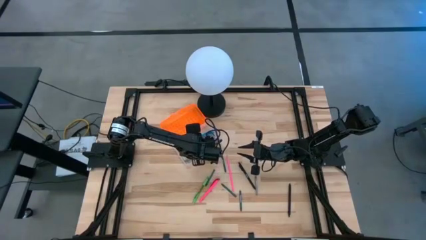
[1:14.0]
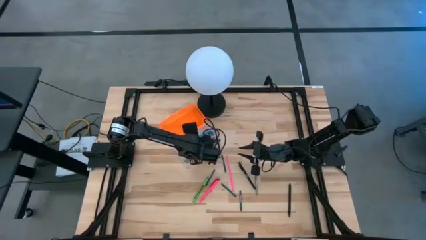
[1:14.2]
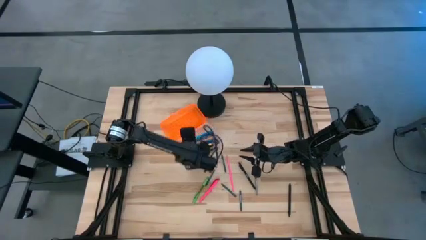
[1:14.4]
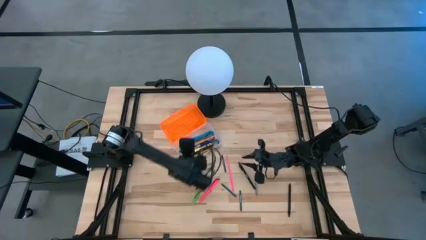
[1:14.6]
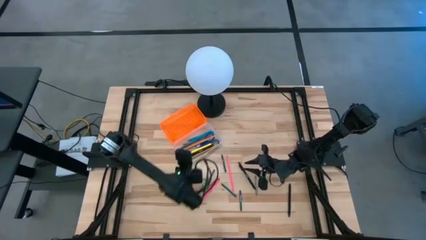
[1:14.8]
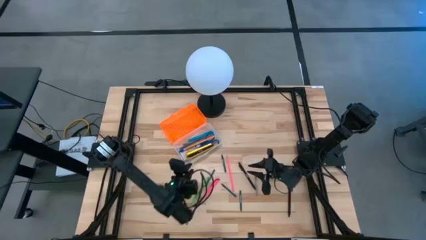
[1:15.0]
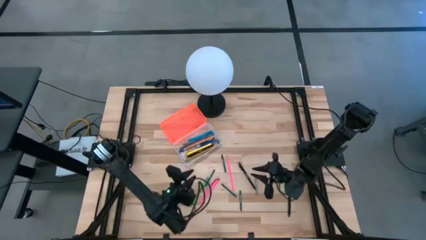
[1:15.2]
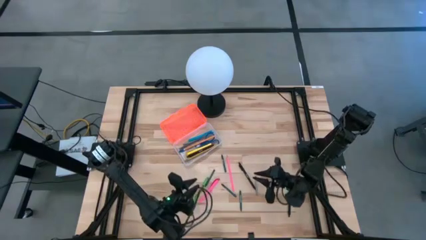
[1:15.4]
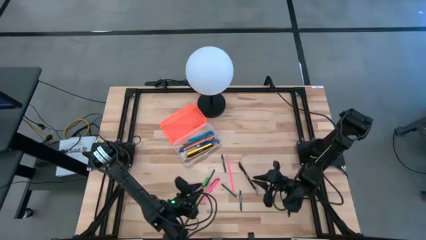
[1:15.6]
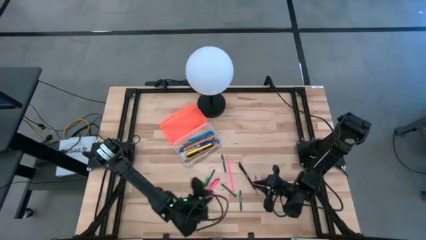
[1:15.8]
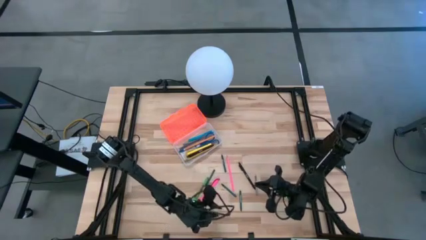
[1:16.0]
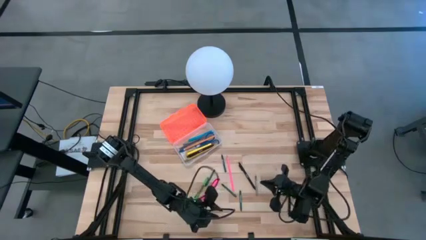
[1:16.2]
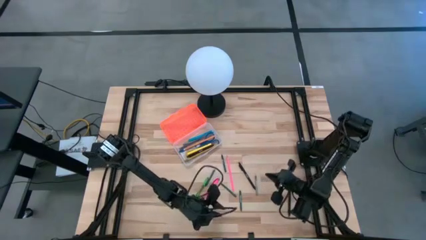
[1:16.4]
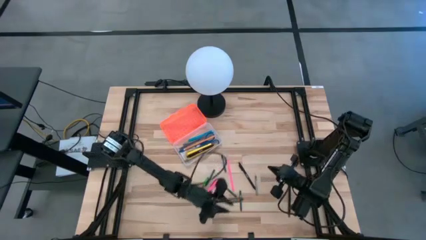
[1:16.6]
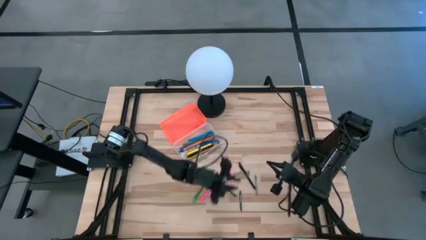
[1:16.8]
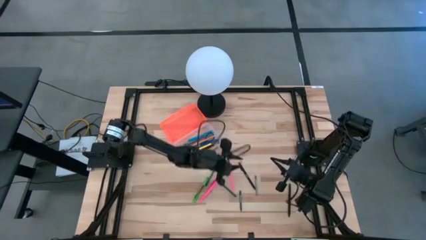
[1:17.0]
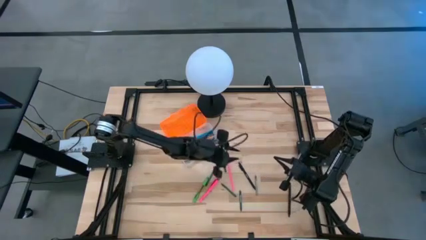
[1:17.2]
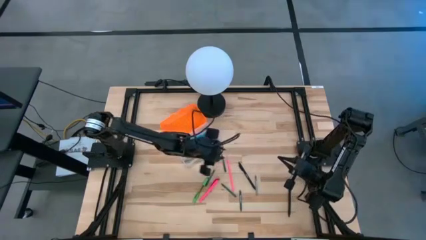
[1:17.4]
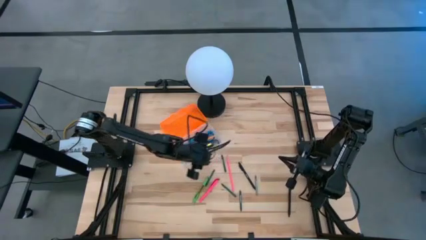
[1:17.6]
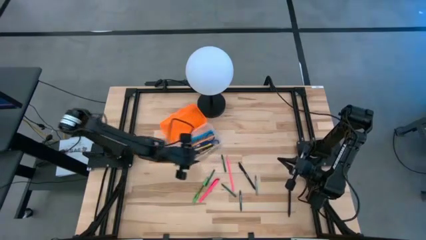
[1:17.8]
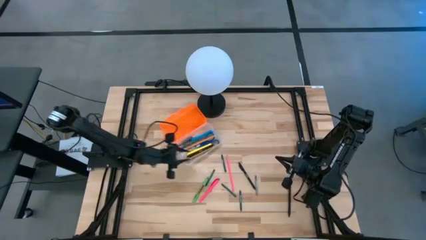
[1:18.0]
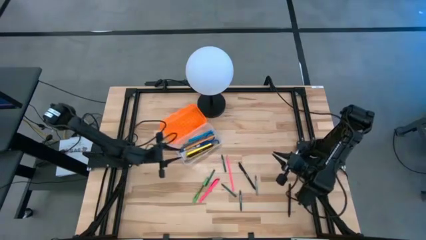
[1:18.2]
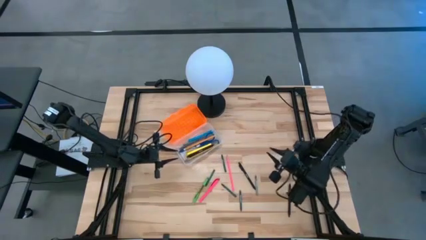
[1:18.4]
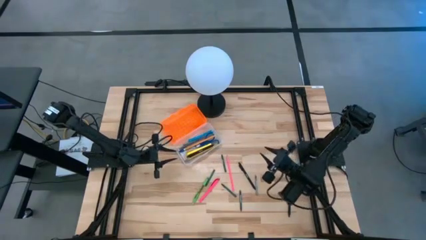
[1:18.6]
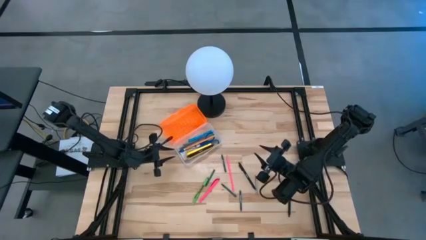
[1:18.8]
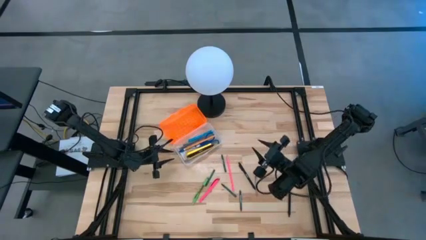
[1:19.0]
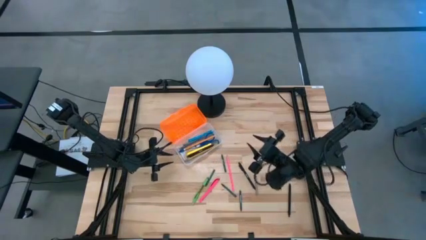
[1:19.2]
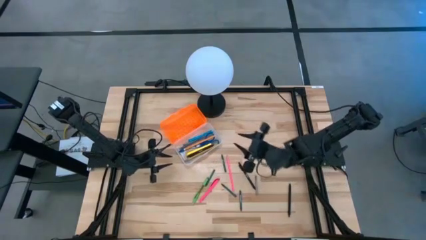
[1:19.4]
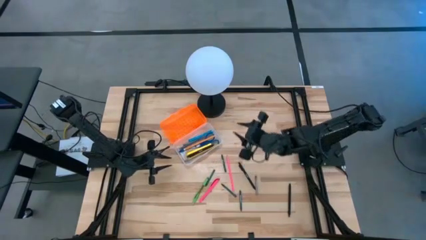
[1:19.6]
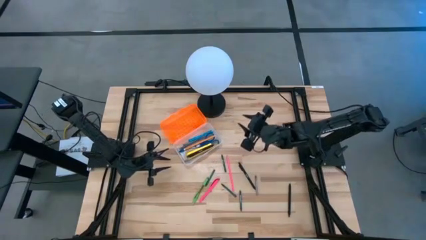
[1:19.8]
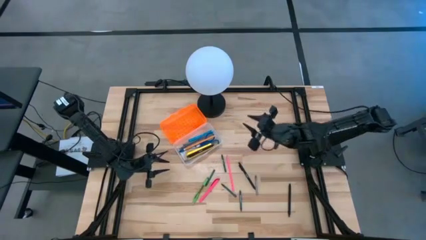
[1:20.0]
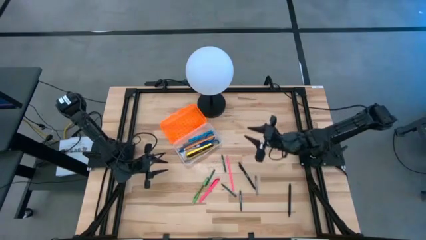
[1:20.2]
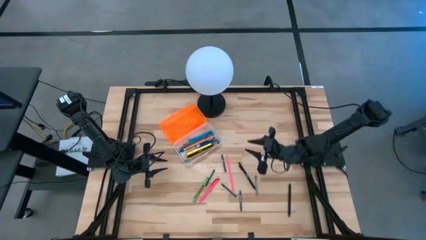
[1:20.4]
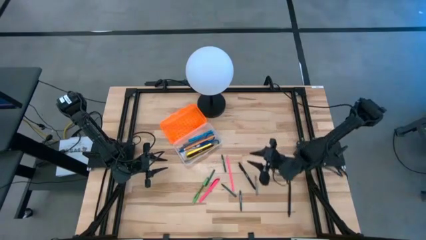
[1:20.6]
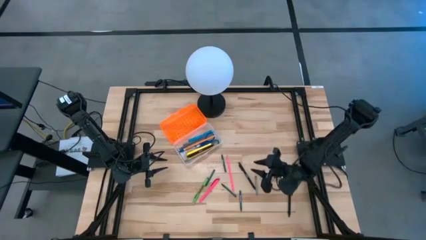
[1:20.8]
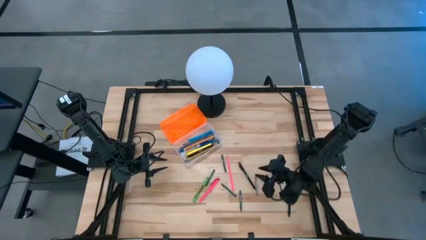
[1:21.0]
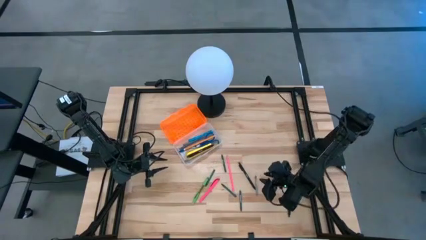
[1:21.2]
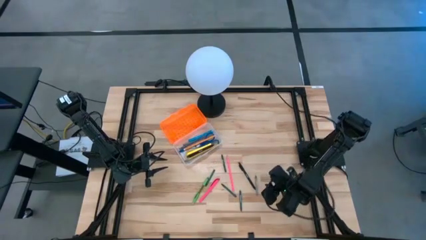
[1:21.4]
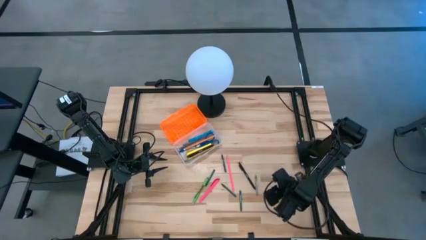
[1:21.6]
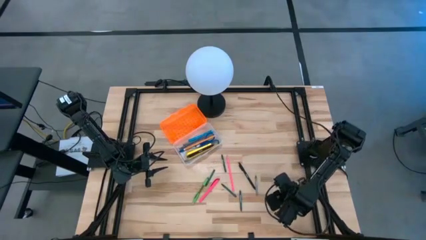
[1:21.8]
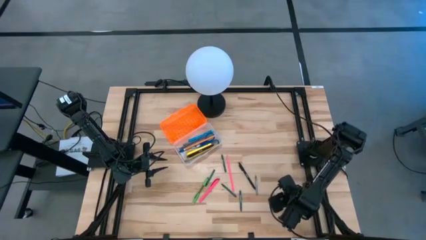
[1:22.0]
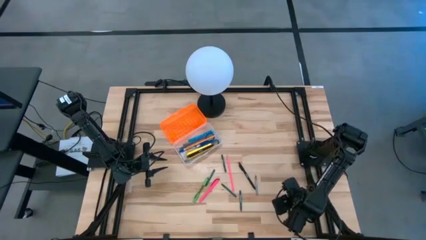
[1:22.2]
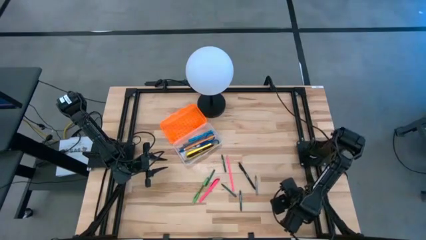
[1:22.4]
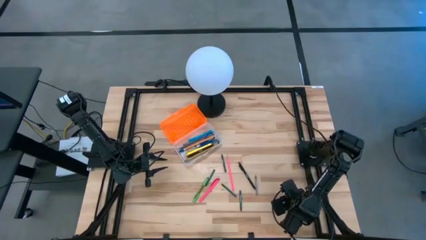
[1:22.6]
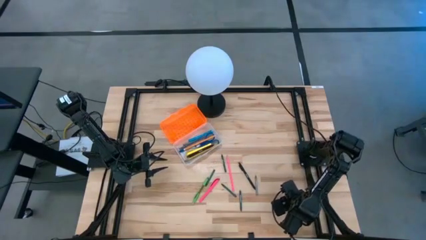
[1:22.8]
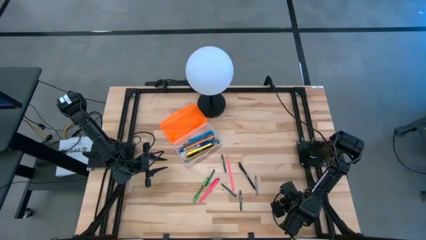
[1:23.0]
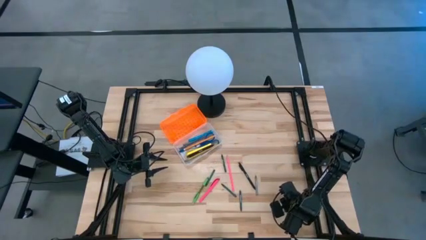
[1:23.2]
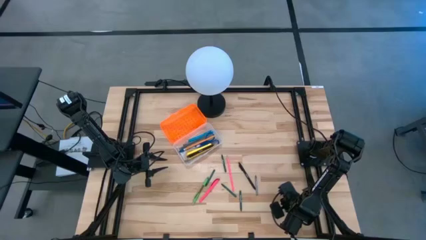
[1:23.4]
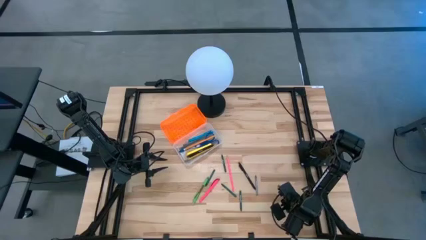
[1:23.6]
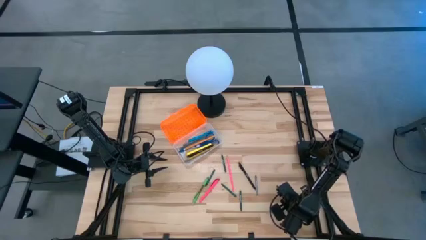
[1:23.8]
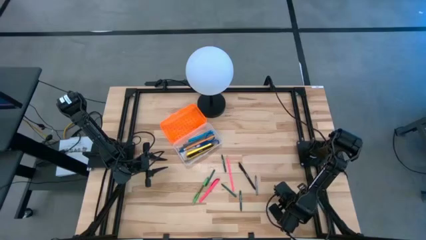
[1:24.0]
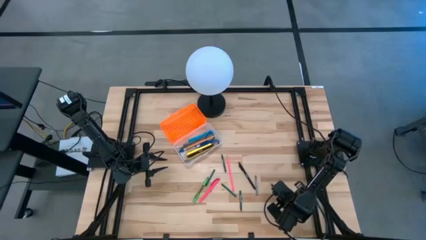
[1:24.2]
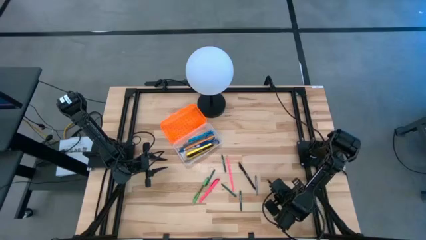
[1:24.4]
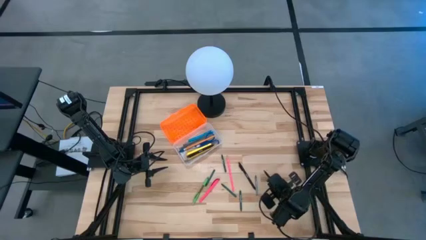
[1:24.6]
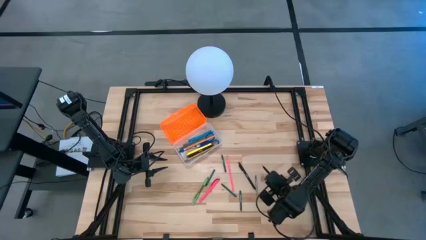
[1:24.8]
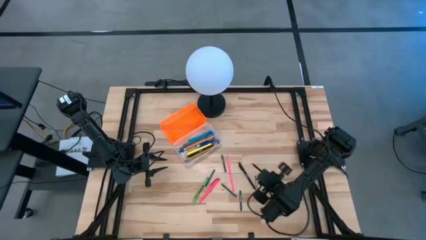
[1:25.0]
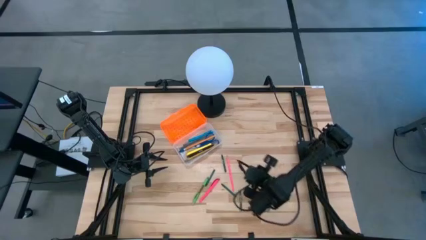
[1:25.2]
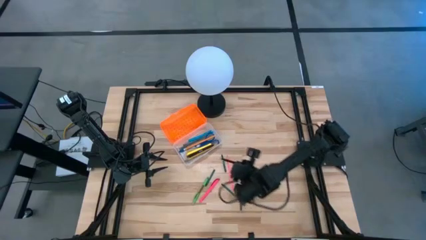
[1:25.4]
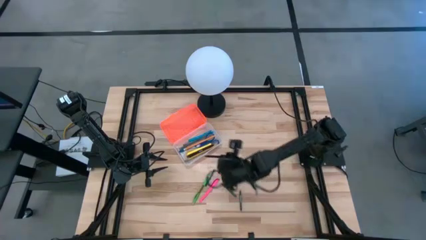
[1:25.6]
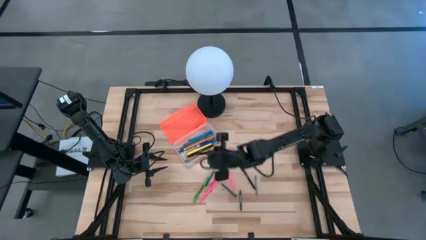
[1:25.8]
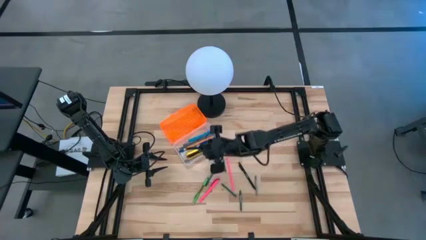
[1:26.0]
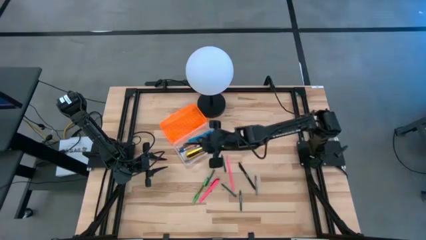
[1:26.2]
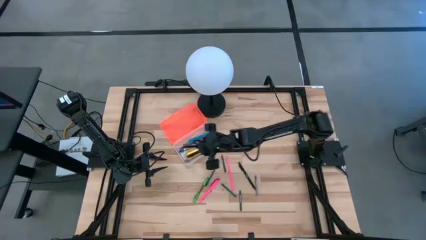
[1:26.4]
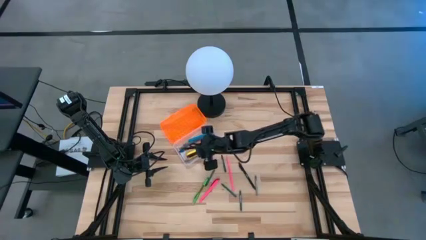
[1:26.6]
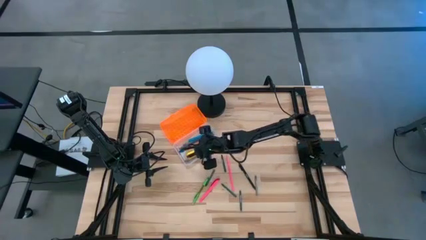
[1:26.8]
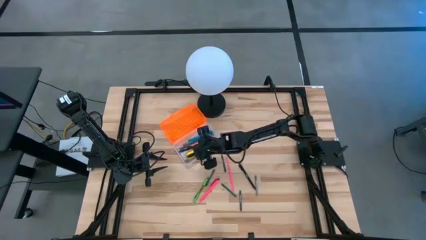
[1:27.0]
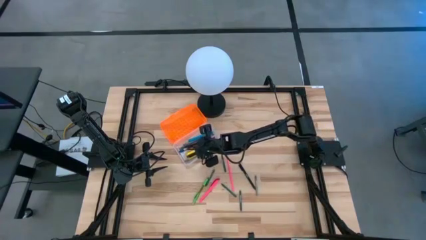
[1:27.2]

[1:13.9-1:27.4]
Task: Pick & place school supplies into a supply box
Put the bottom black pen into the orange supply box

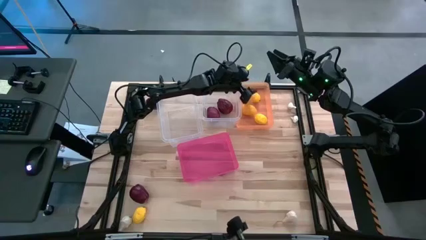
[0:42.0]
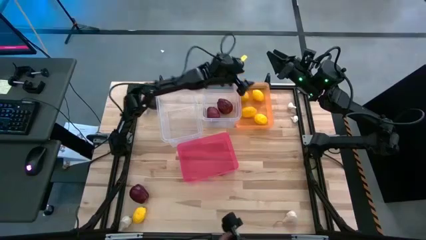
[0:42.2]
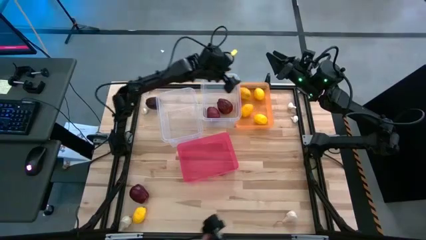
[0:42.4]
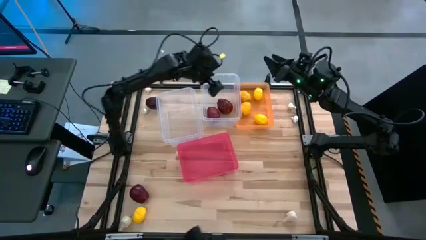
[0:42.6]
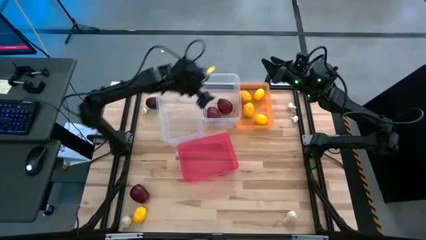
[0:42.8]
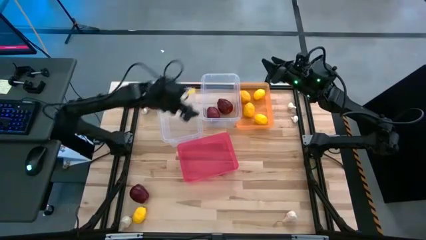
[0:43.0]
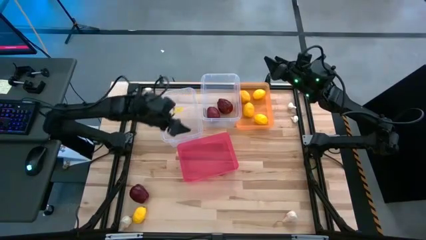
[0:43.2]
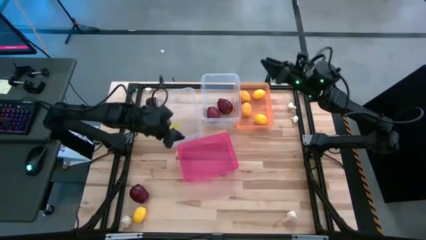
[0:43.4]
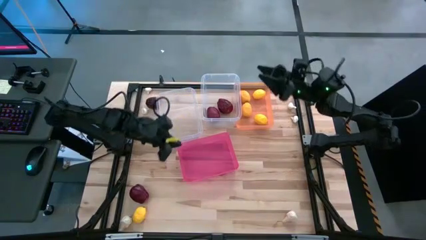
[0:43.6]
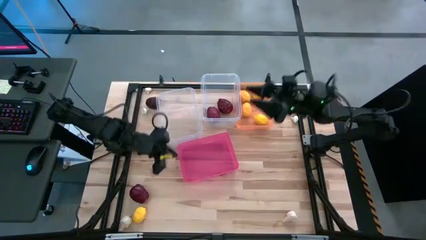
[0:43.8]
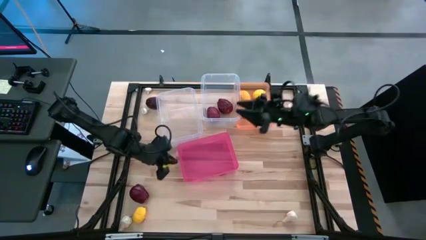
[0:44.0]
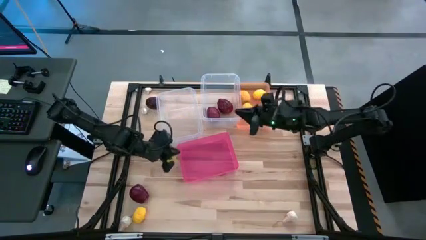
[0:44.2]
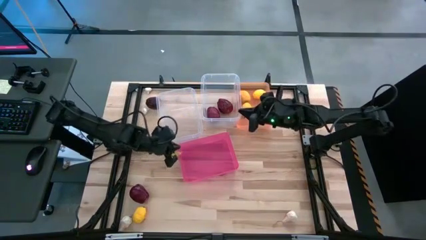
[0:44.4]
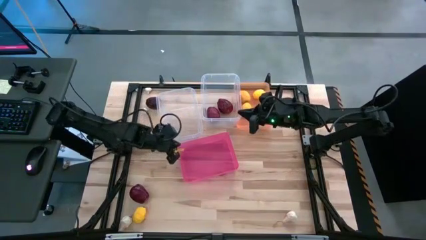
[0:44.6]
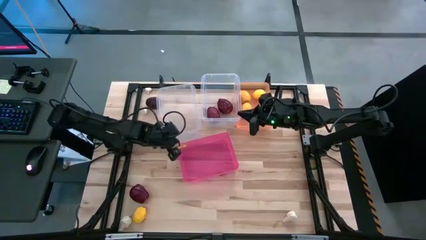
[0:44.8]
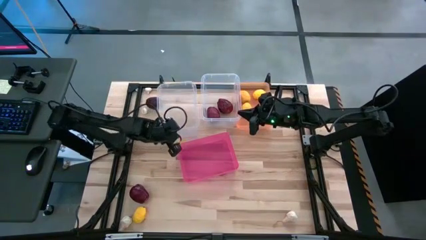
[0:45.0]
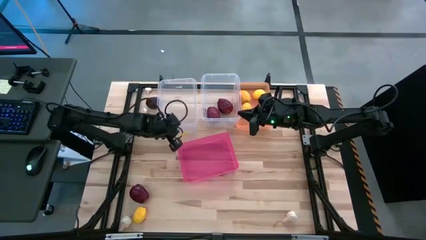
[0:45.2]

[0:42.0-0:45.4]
Task: Sort produce into baskets
Adjust the left transparent bin
